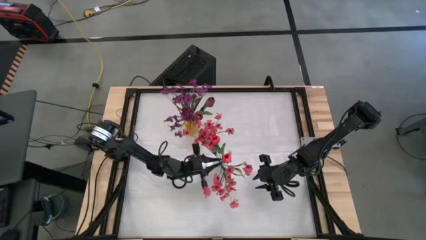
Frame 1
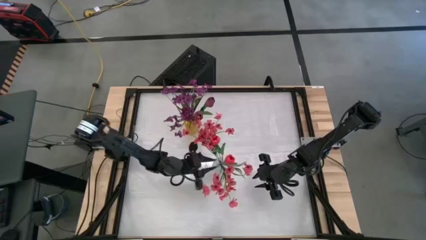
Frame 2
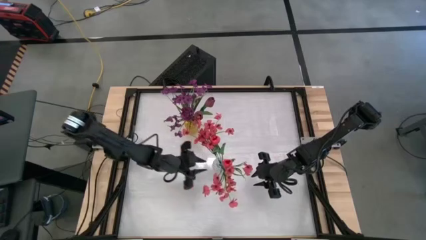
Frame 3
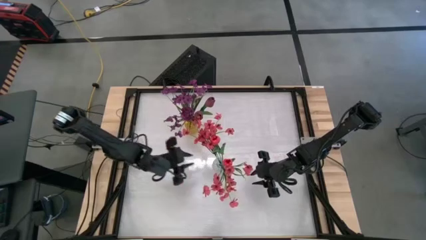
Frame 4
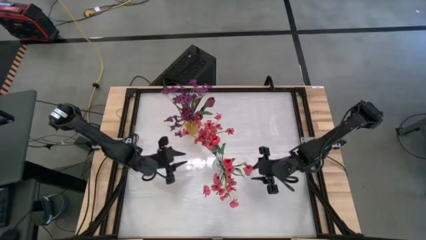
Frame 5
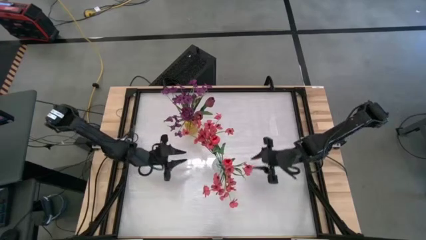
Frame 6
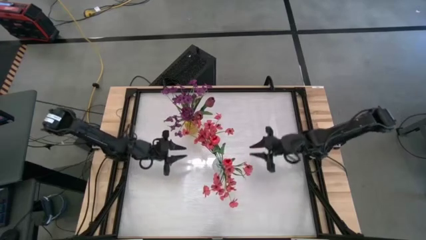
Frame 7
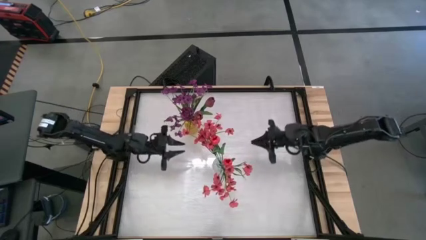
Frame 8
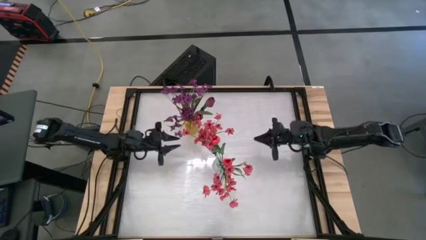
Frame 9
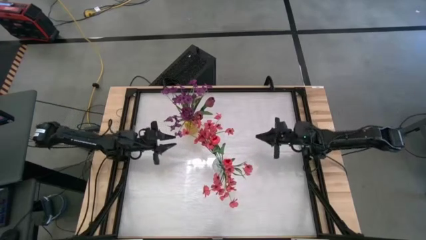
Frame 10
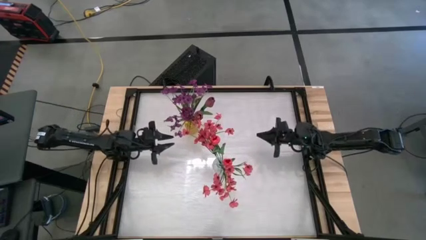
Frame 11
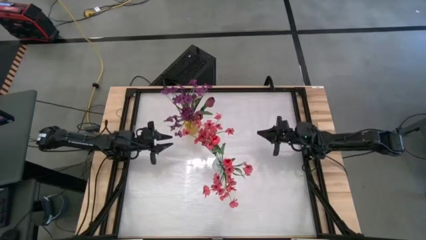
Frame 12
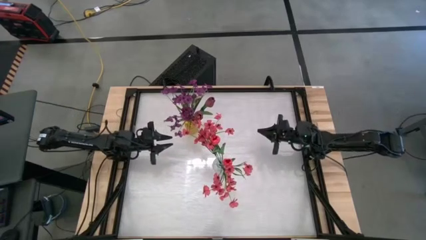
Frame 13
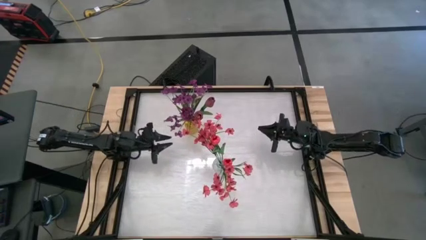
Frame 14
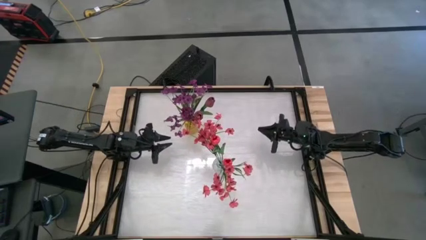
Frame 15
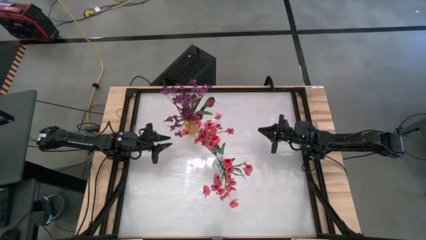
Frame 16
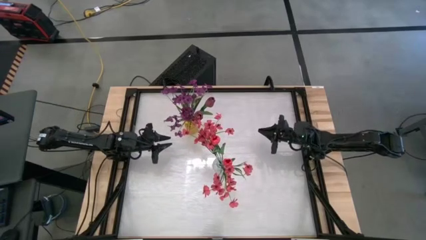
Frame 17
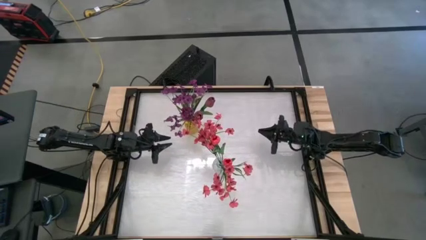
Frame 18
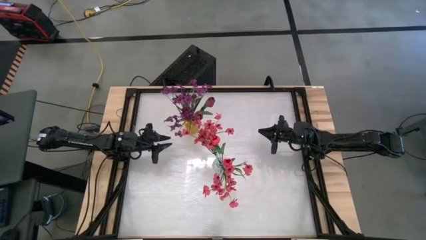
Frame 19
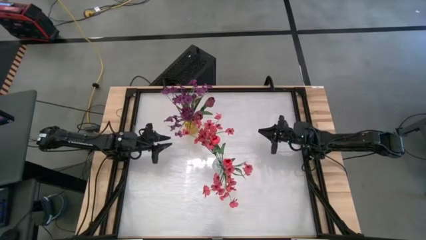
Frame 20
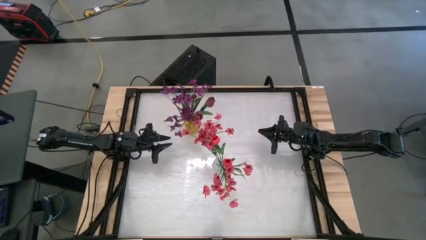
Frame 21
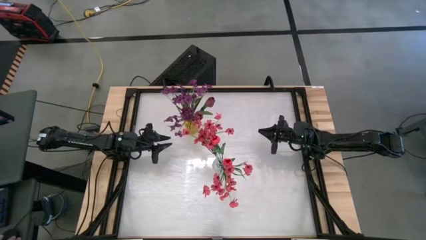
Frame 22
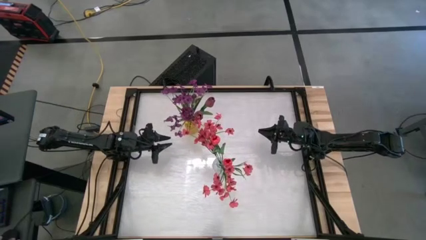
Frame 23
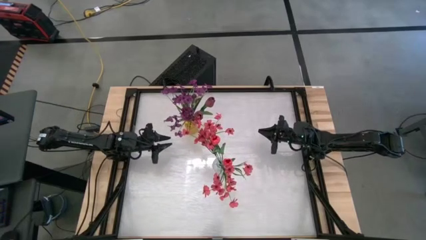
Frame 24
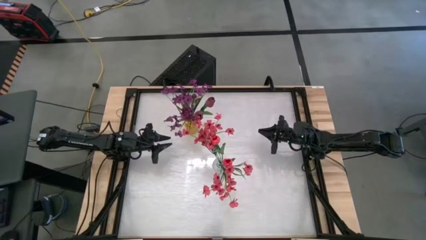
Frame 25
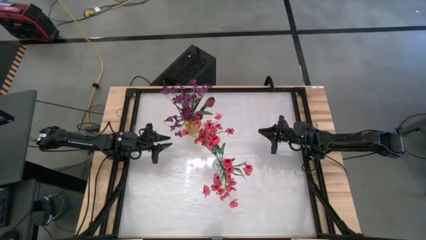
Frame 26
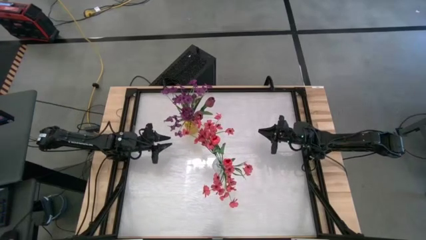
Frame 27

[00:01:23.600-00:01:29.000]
Task: Sort flowers into vase by color
Return to Home Position

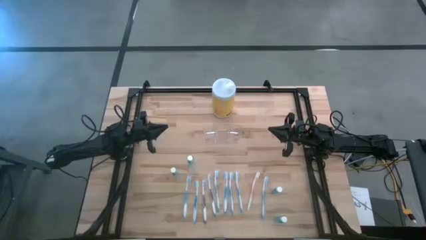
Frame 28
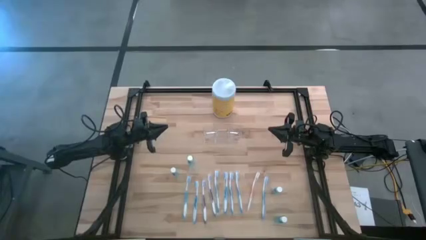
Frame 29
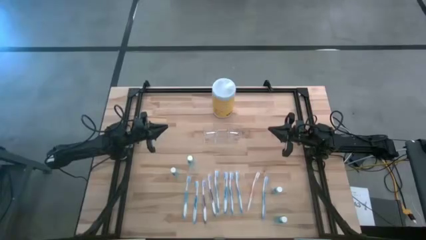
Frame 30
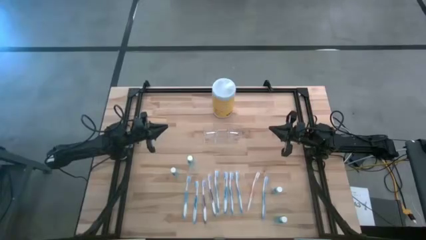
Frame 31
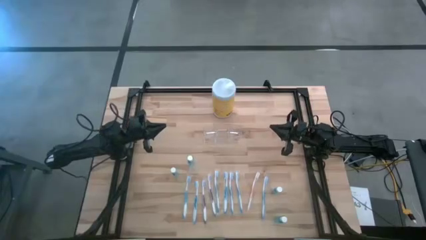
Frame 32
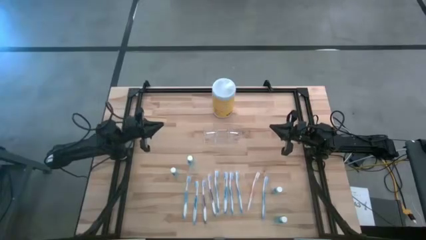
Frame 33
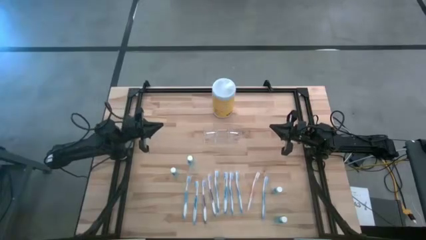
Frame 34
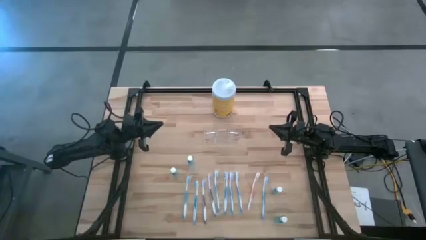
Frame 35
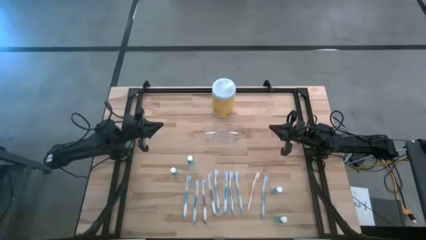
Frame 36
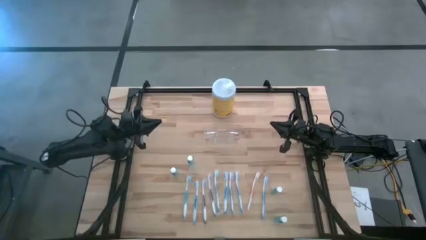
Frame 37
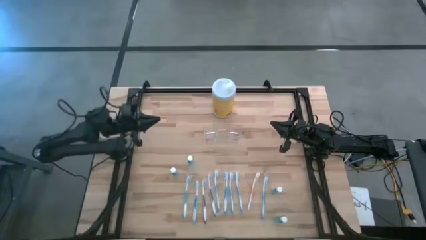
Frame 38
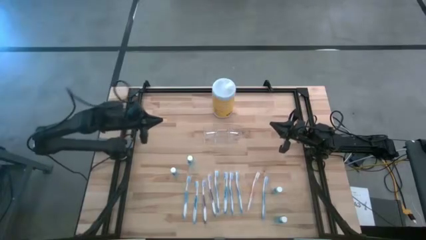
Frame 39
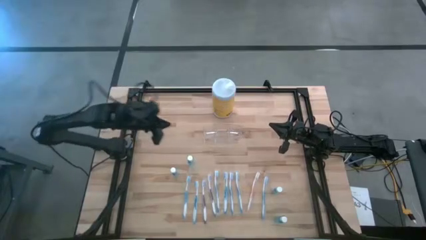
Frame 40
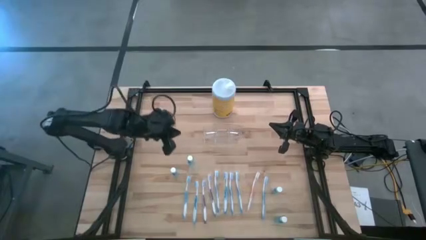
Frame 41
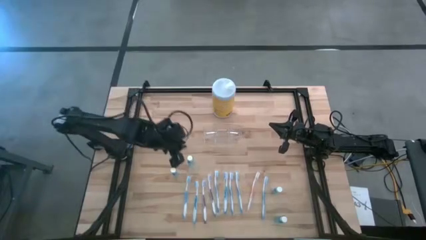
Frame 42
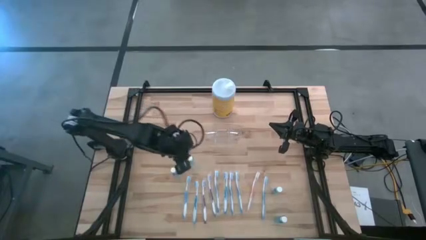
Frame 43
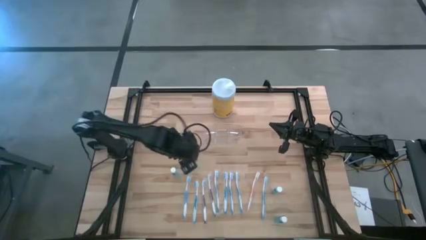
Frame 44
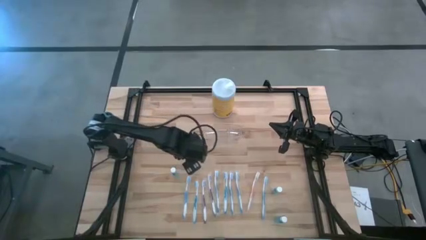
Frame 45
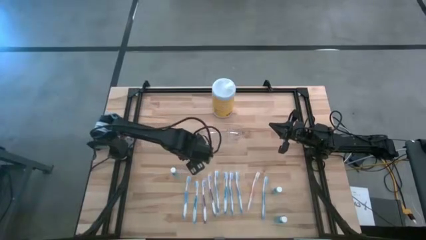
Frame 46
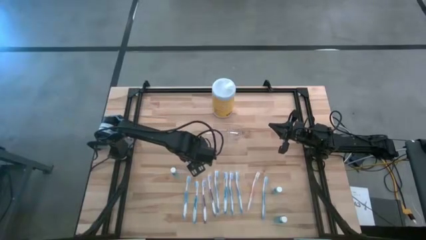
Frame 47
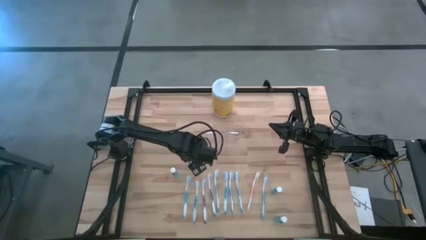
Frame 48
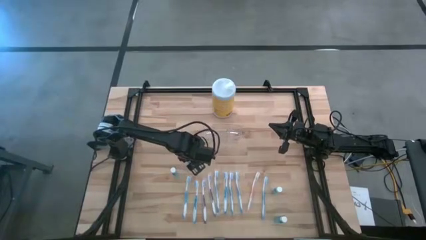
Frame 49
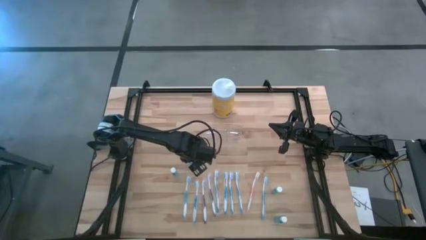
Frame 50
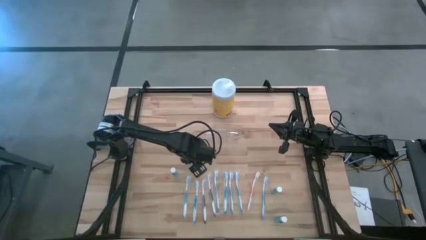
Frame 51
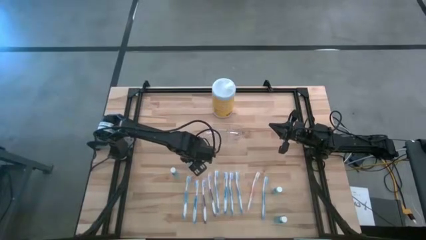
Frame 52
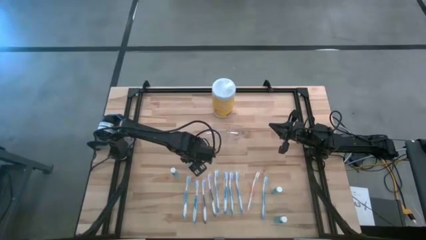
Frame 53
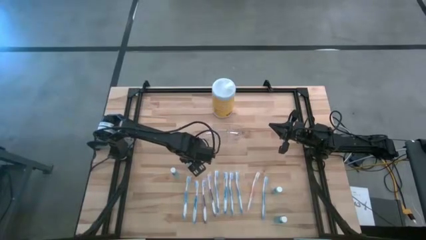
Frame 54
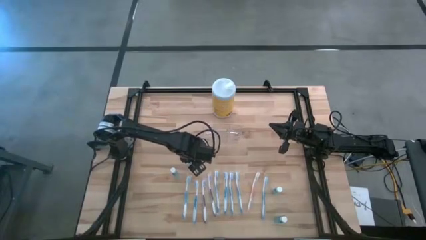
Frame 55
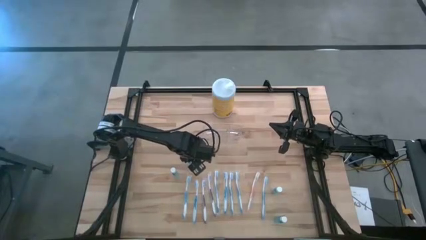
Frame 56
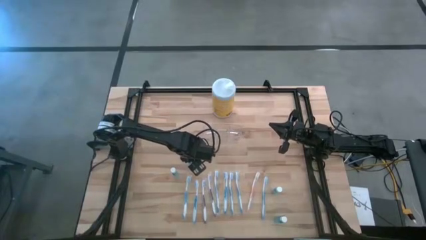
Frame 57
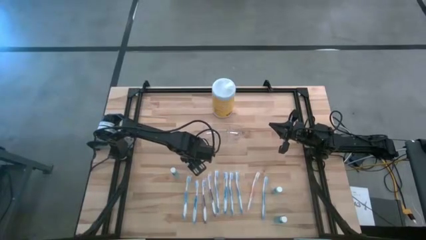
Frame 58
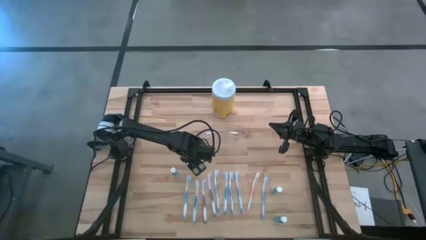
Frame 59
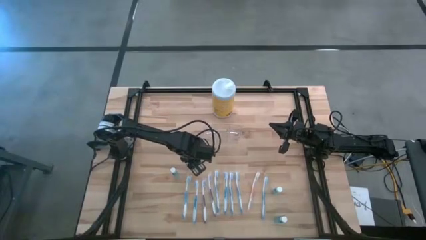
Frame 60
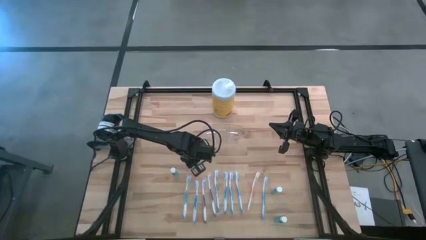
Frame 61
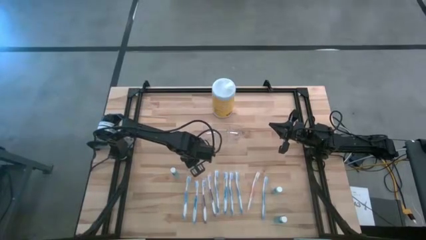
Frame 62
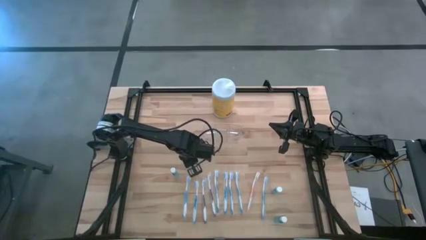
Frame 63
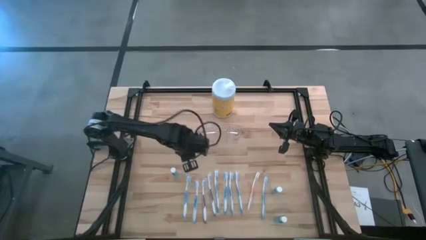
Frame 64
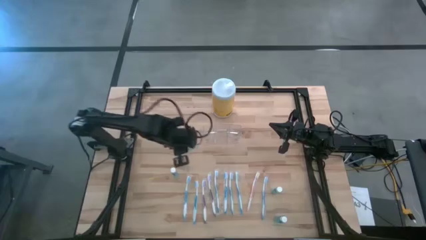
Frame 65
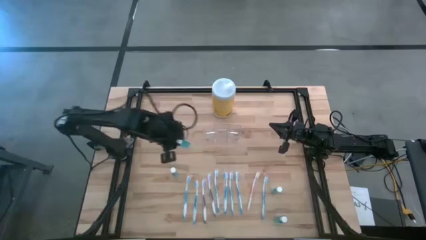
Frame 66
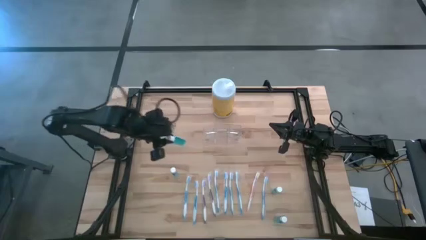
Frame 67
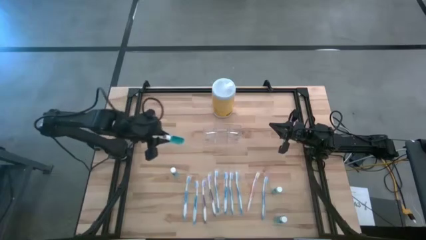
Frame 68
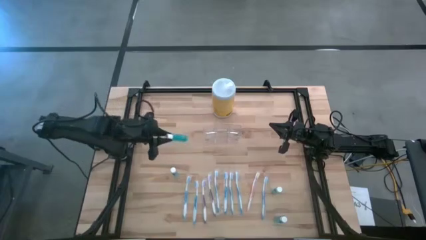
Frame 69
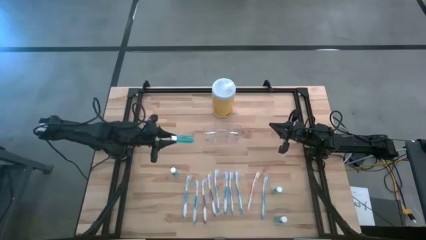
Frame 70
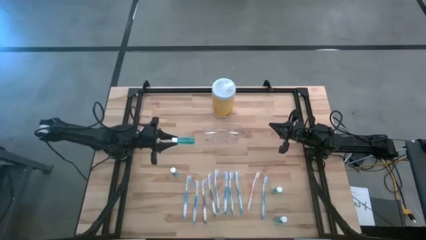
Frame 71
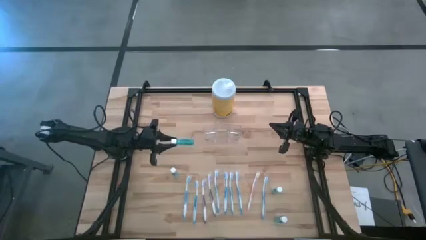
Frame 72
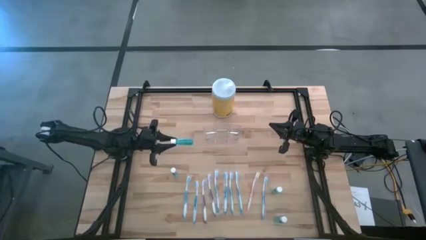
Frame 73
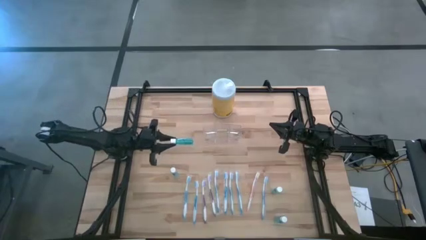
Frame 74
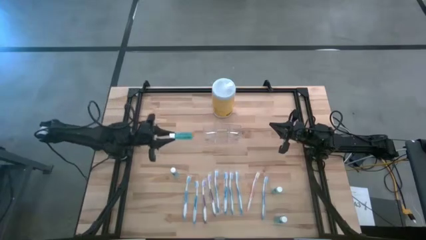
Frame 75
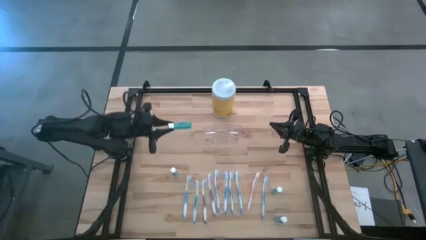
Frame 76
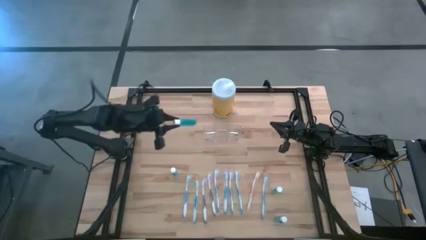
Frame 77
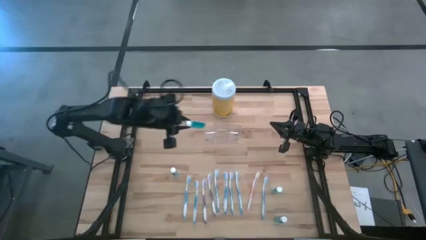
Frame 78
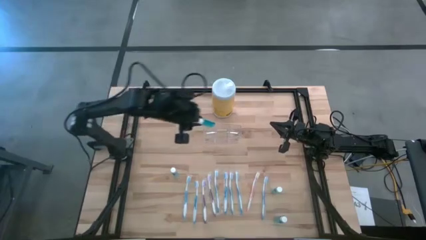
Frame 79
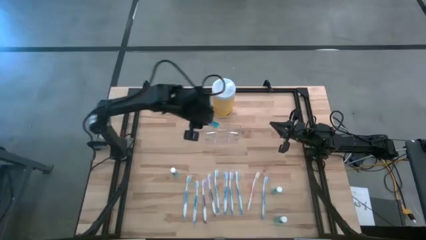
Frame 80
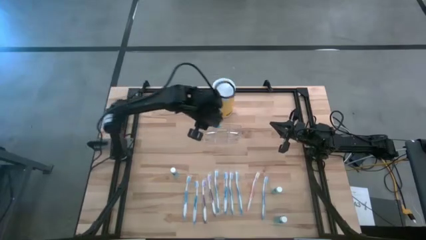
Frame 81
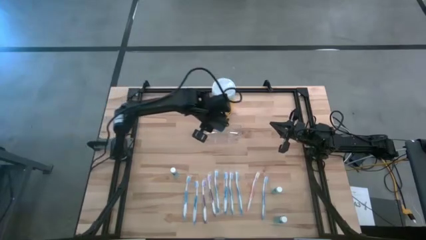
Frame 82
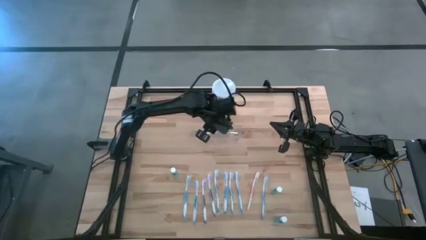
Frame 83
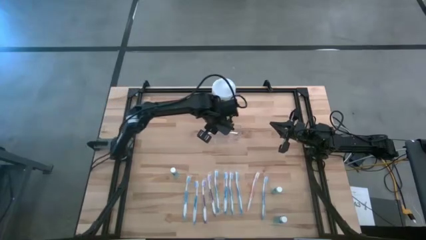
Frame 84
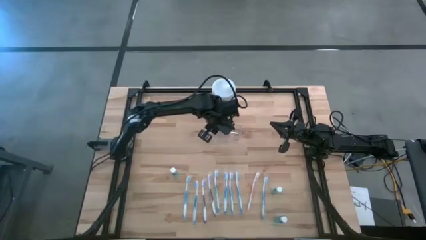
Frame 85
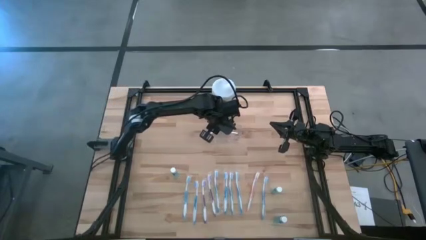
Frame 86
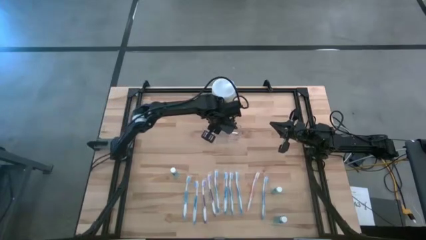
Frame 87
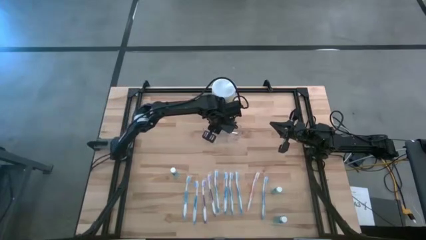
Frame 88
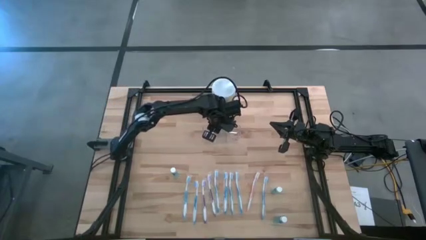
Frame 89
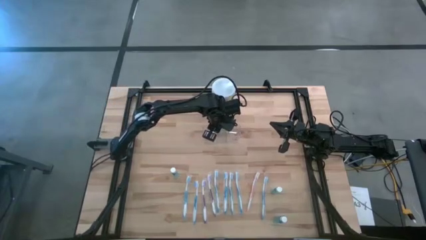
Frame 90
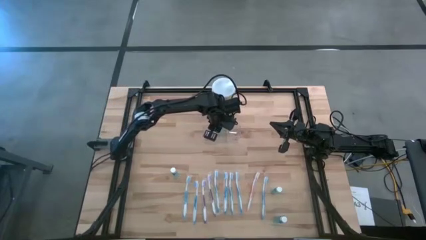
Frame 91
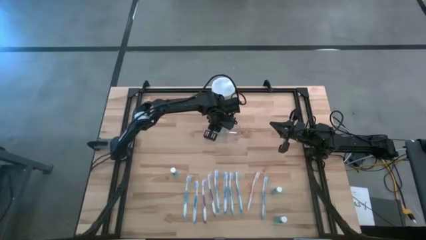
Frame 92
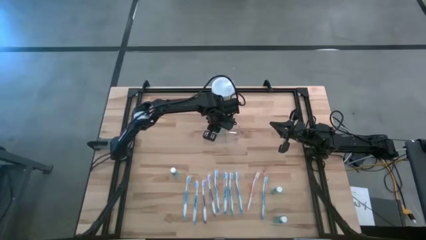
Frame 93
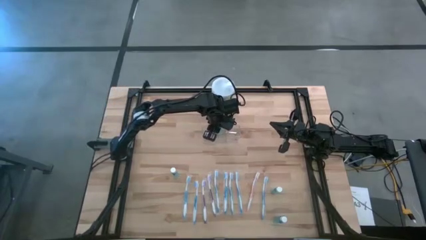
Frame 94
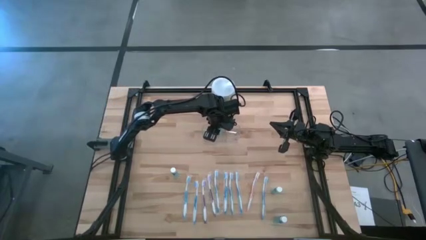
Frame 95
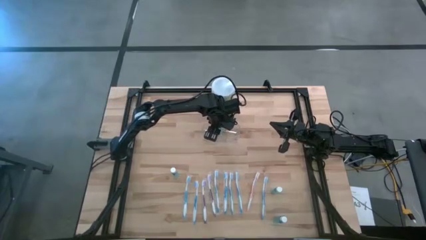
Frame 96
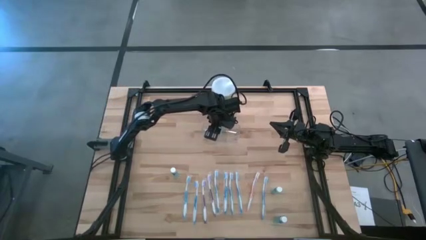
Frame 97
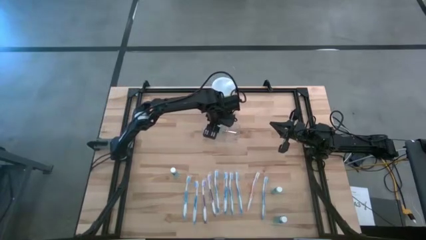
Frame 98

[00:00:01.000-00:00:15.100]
Task: Pick & Place toothbrushing station
Put the blue mouthwash into the transparent organizer
